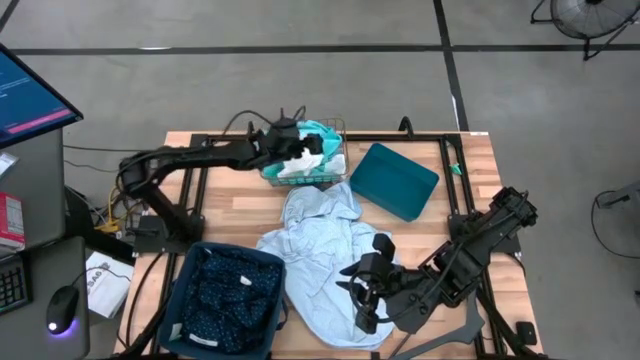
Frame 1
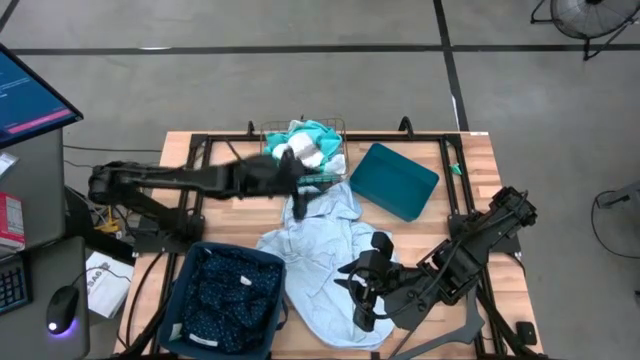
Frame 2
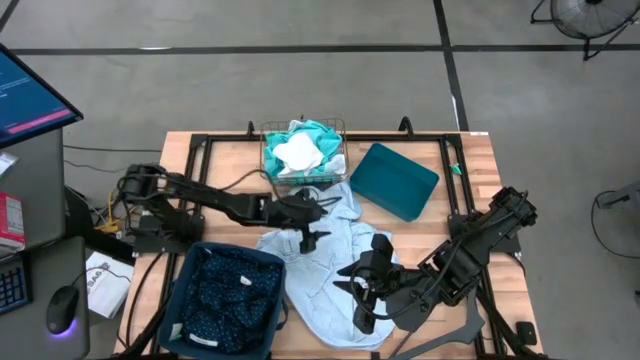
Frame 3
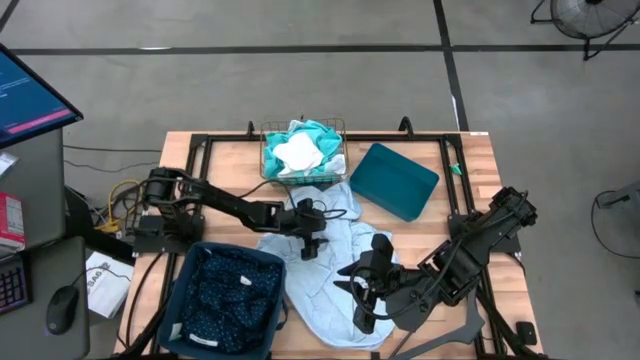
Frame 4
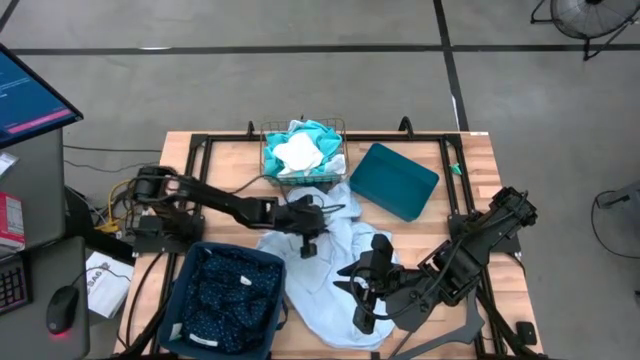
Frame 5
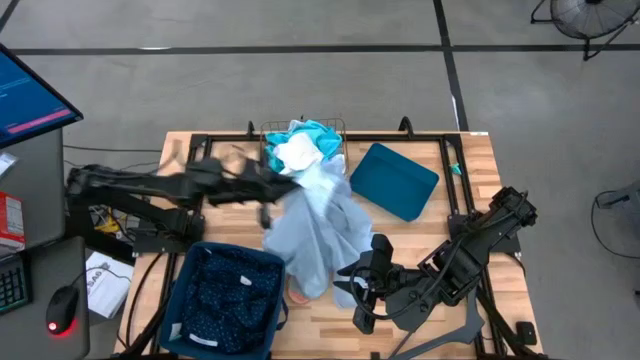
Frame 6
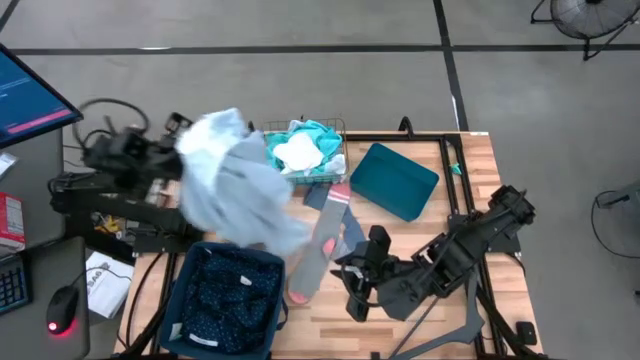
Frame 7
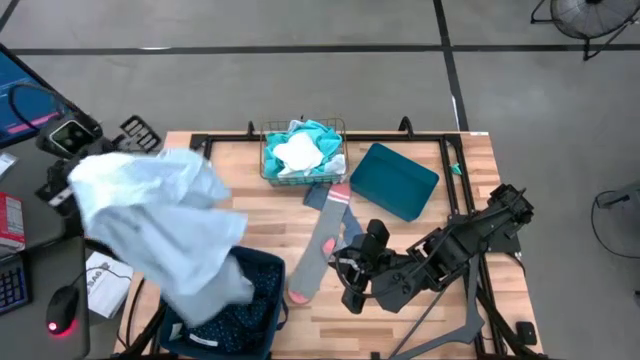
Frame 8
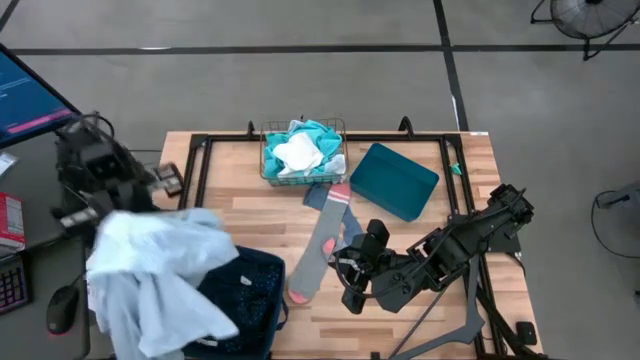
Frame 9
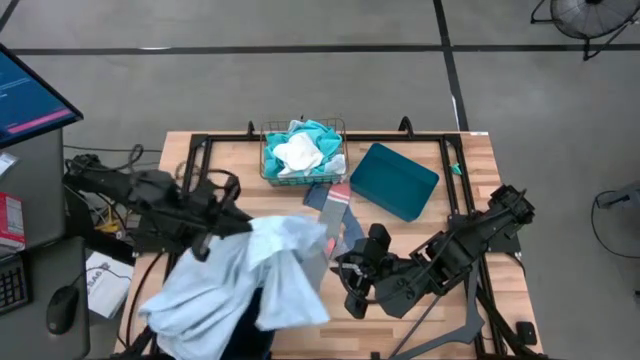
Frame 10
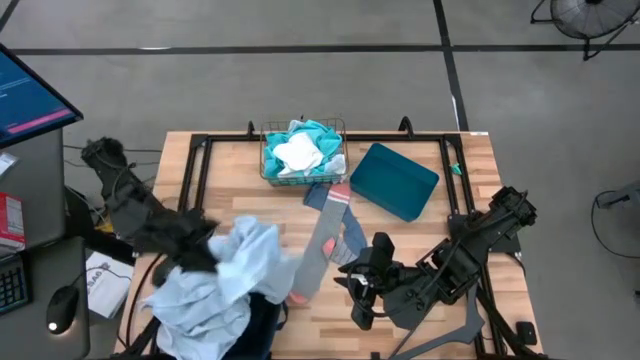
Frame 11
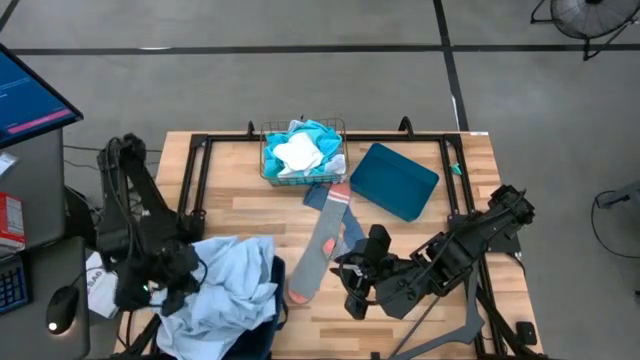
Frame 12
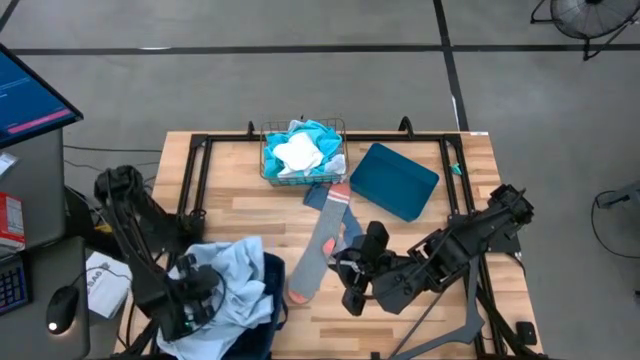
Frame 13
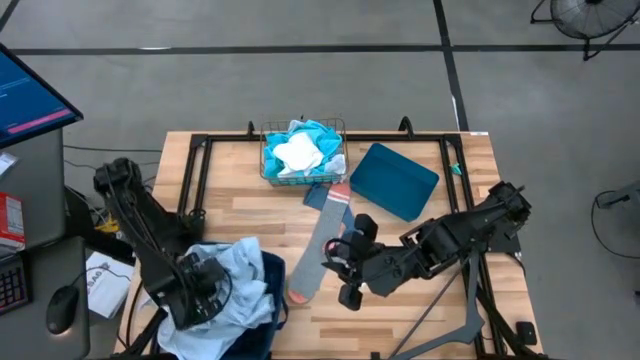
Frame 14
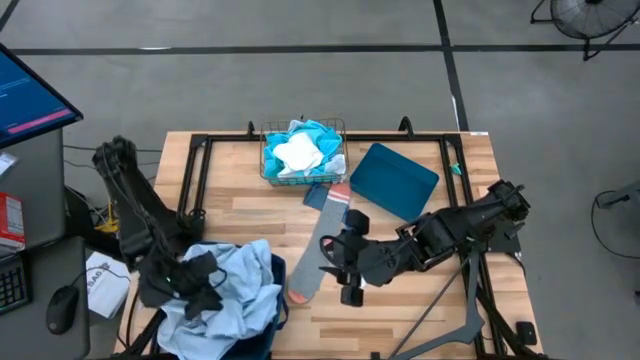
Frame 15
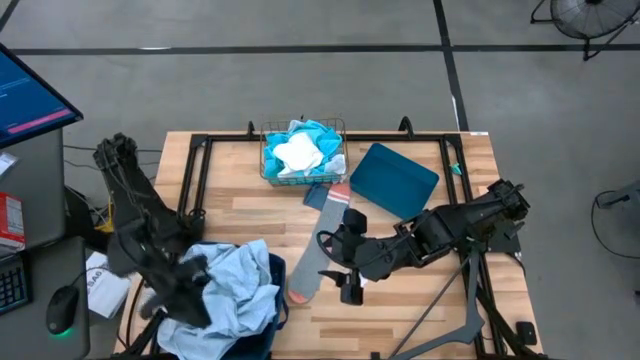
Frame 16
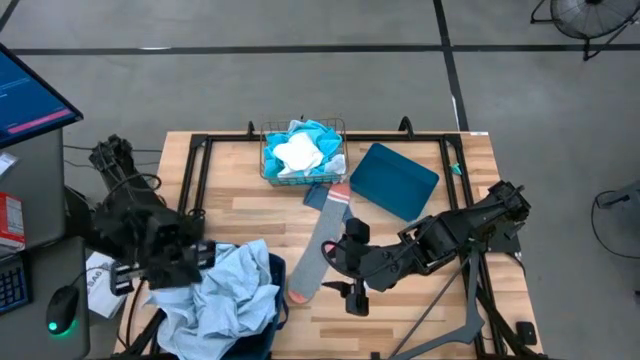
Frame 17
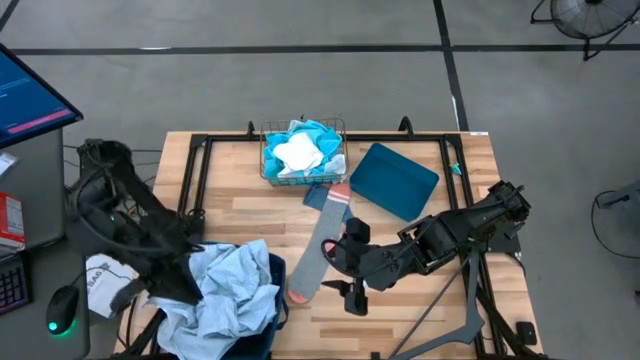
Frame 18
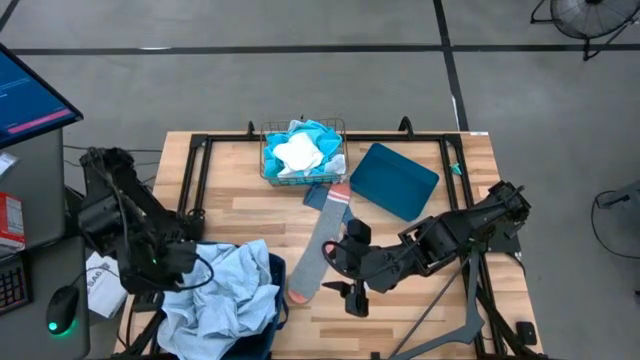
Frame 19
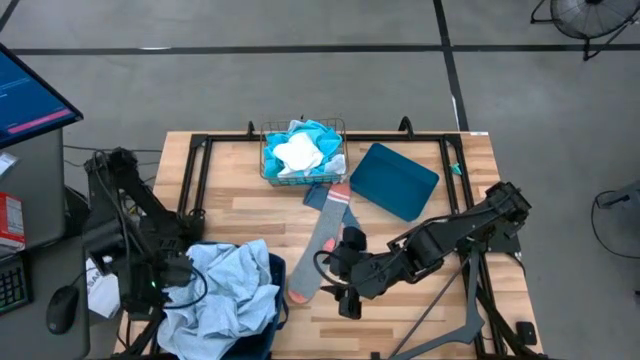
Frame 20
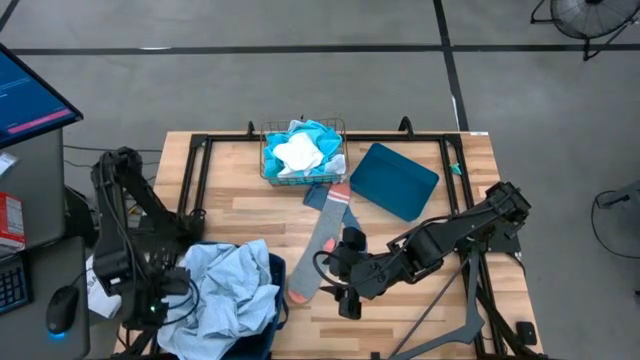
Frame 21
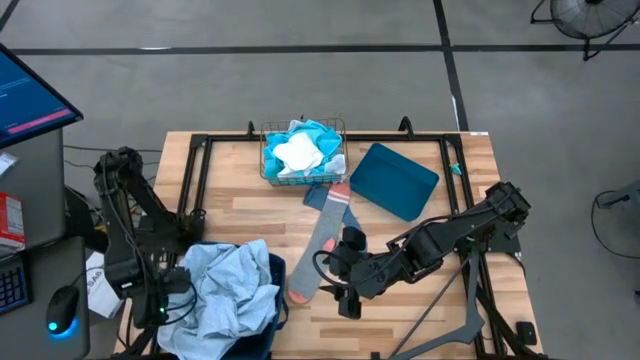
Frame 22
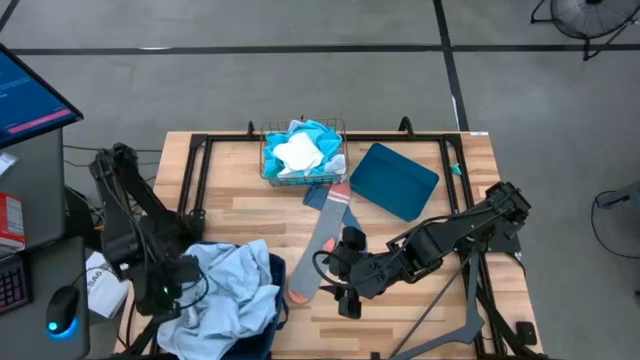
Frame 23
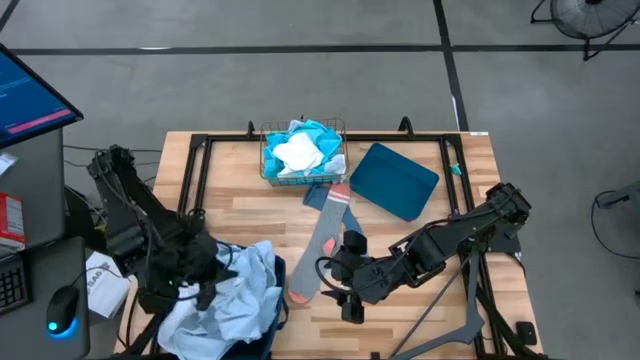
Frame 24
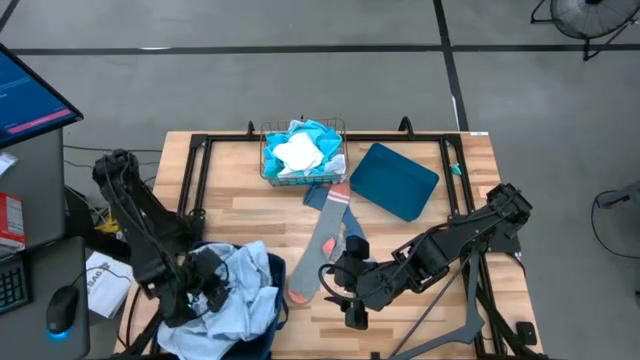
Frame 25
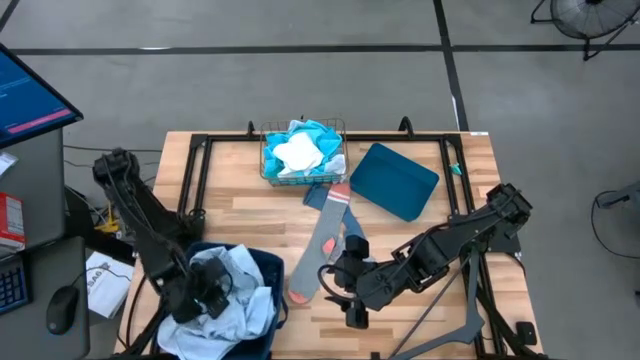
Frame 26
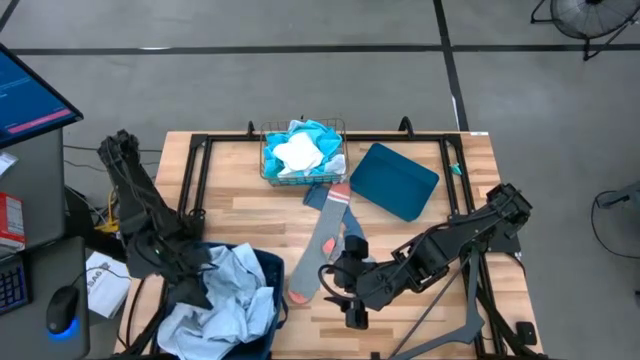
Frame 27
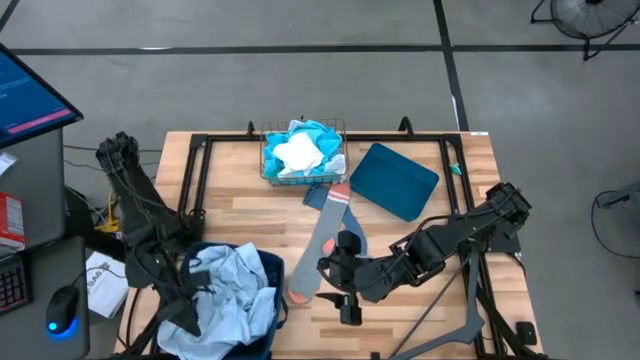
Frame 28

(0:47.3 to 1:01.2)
Task: Pick & Place Cloths
Put the light blue polo shirt into the blue bin

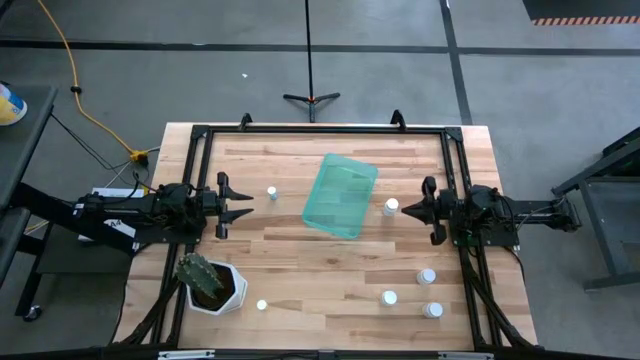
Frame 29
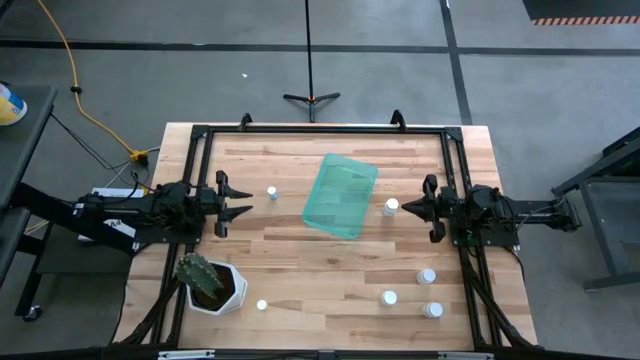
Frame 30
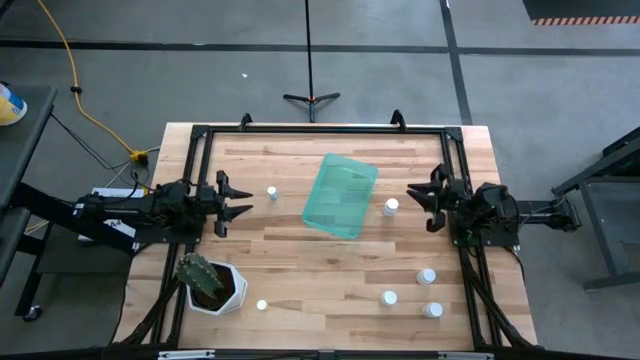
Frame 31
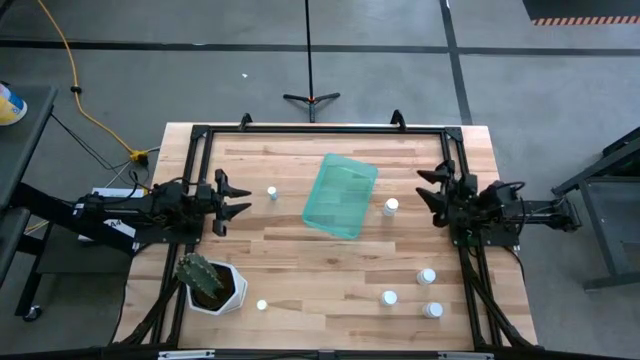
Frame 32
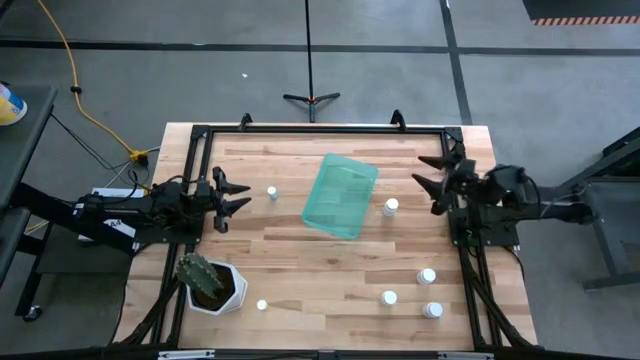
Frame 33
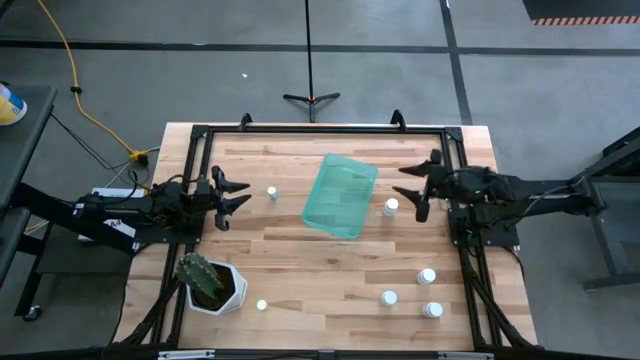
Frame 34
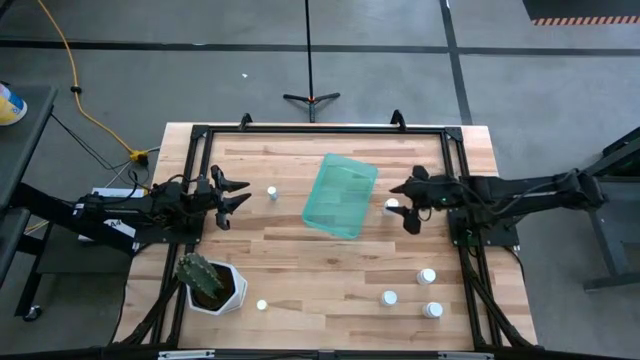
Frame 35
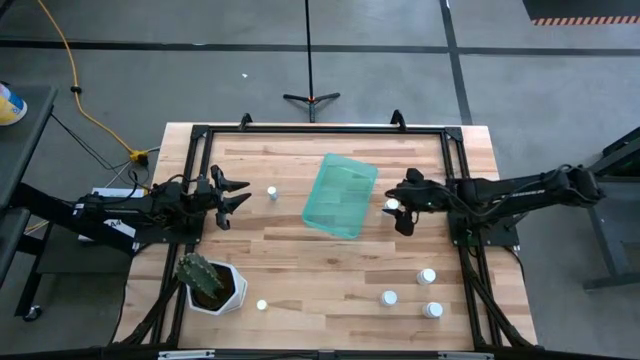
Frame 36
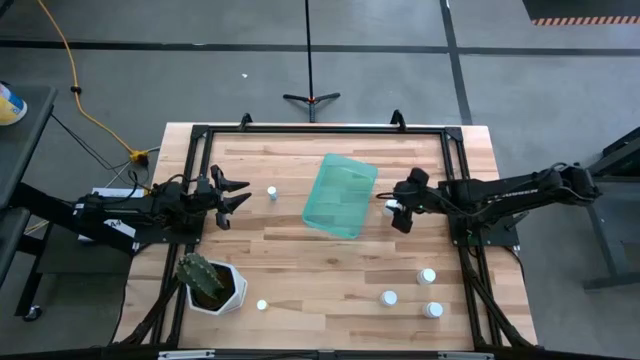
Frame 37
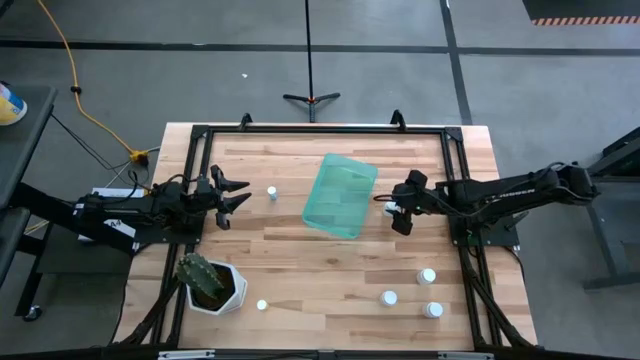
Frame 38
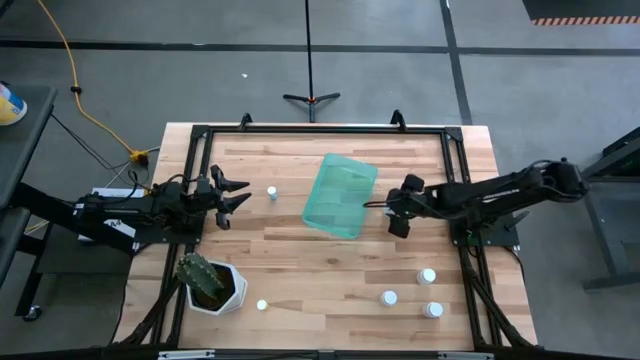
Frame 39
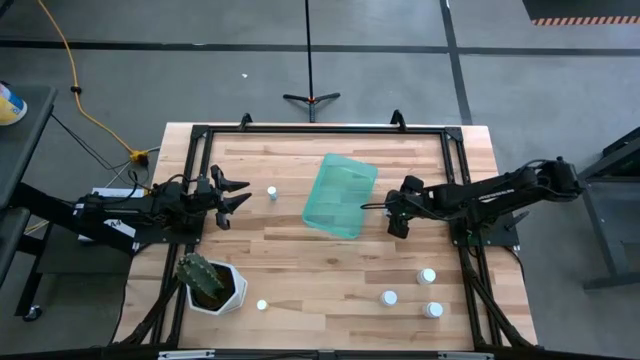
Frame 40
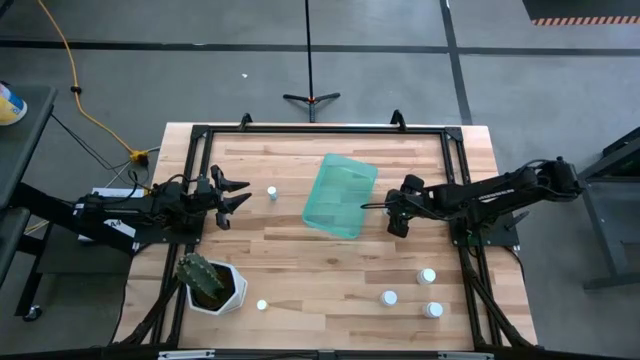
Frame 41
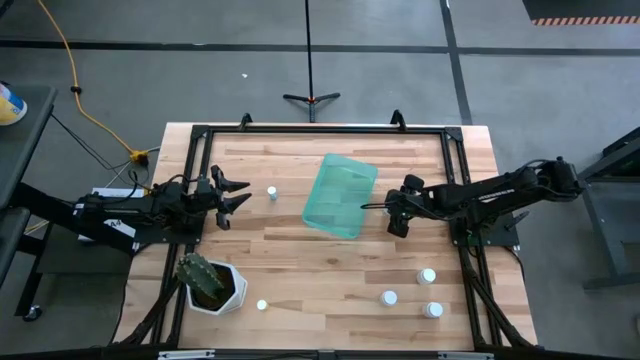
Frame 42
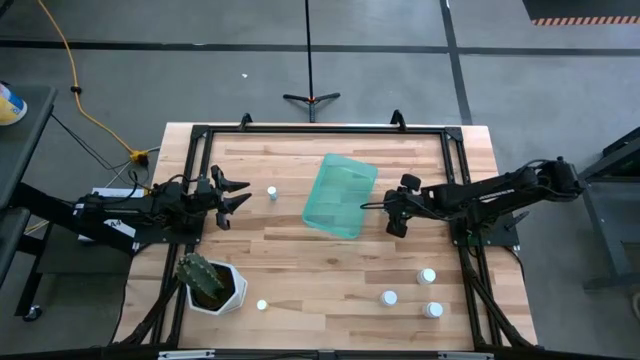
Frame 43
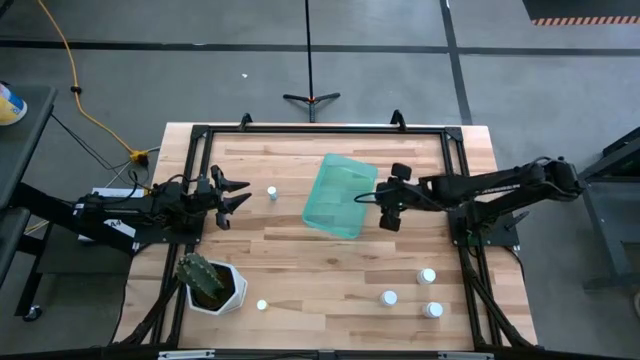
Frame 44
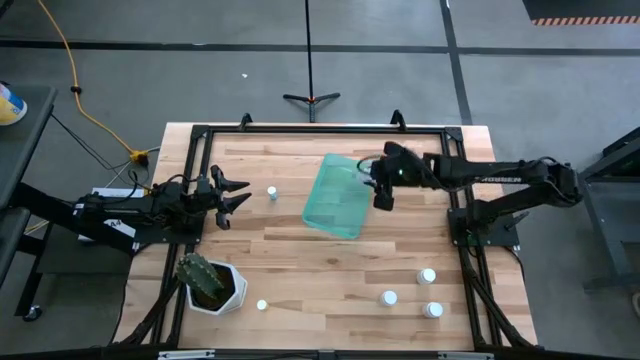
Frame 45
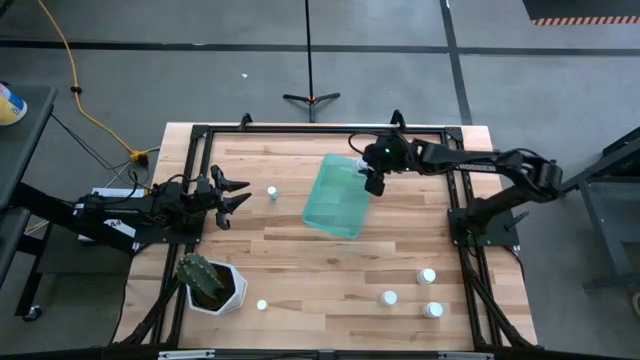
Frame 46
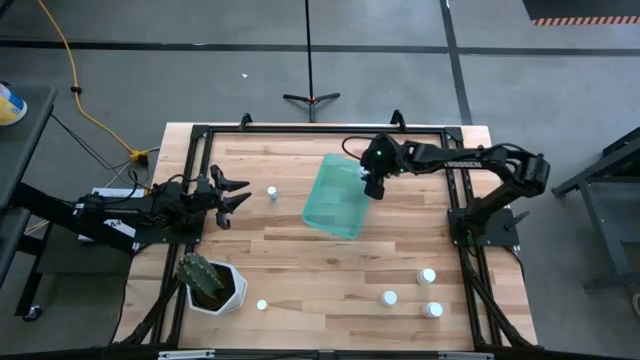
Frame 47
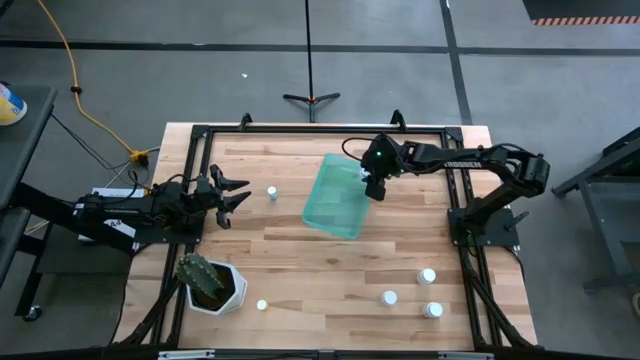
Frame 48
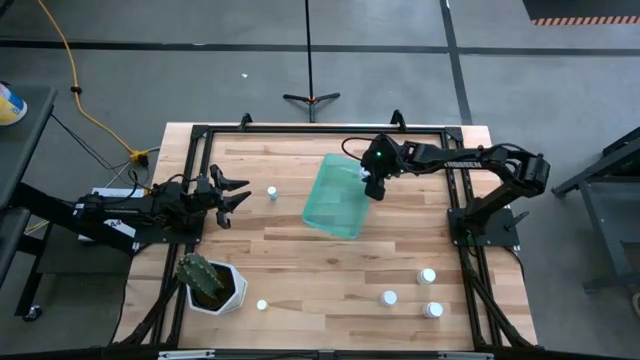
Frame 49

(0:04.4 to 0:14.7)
Task: Pick and place pill bottles into a basket
Put the white pill bottle into the blue bin
